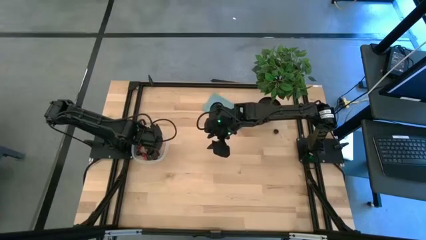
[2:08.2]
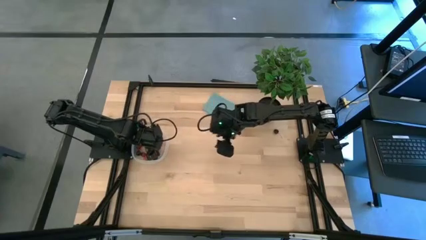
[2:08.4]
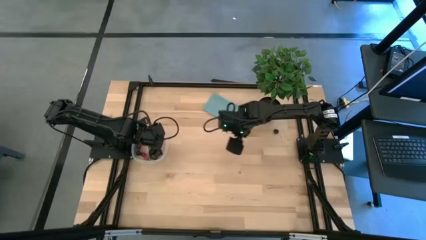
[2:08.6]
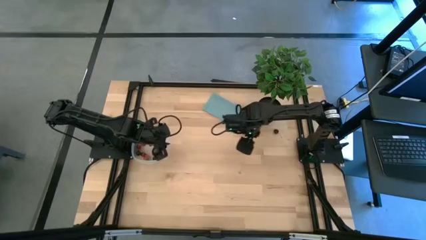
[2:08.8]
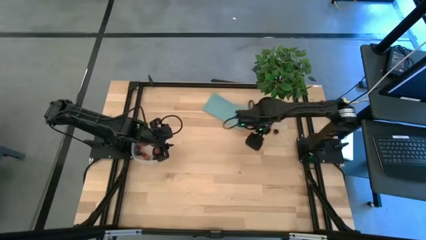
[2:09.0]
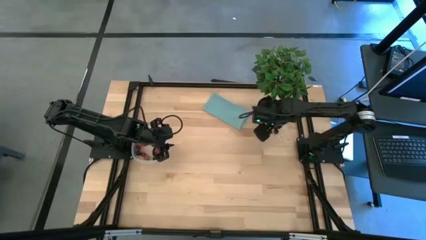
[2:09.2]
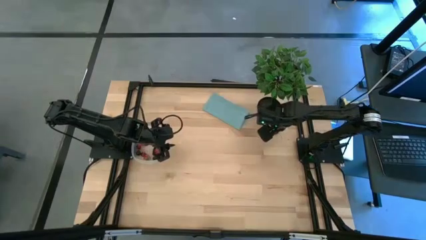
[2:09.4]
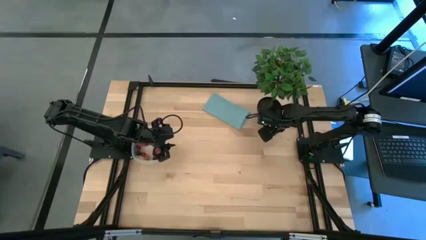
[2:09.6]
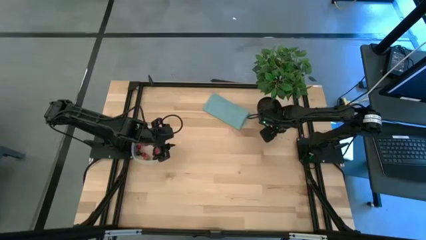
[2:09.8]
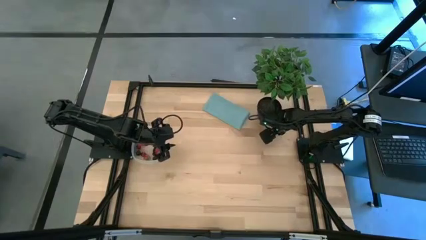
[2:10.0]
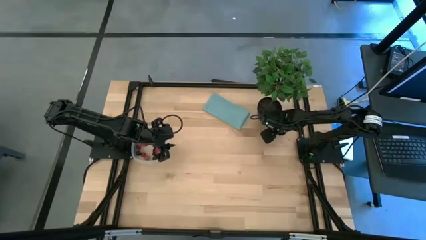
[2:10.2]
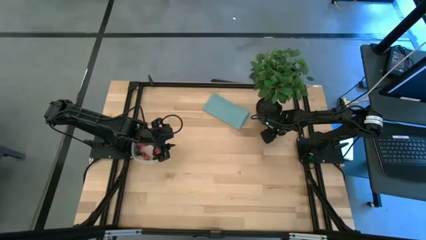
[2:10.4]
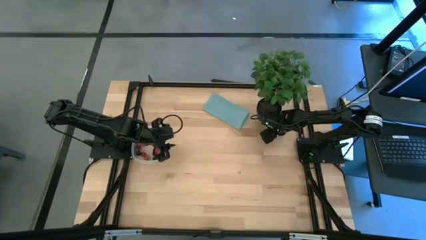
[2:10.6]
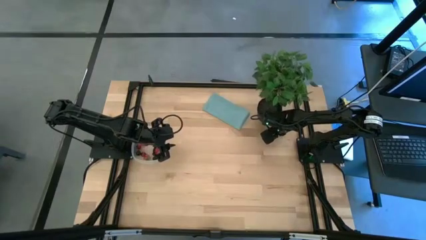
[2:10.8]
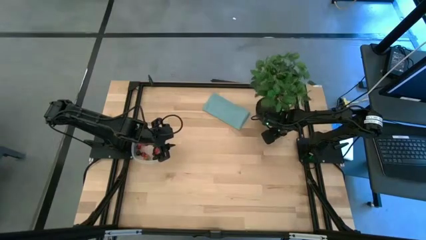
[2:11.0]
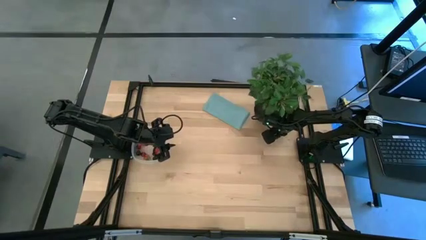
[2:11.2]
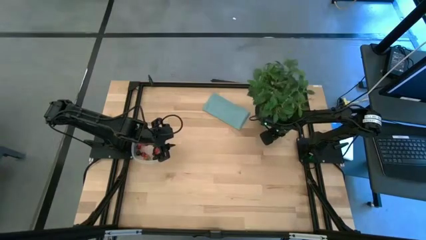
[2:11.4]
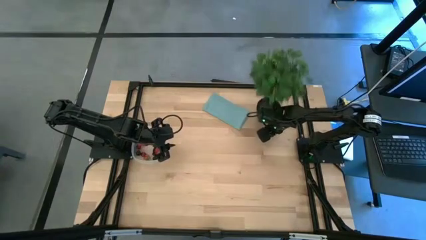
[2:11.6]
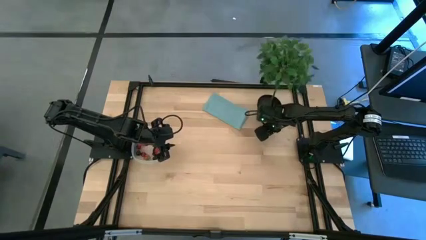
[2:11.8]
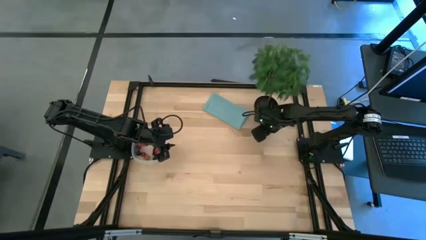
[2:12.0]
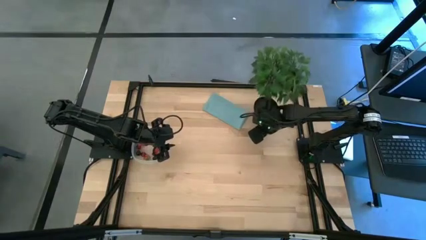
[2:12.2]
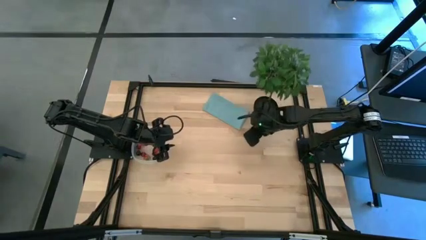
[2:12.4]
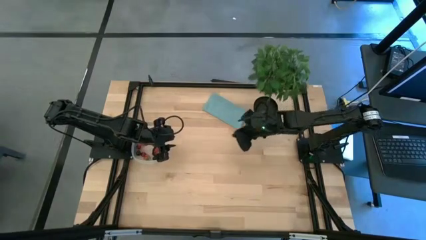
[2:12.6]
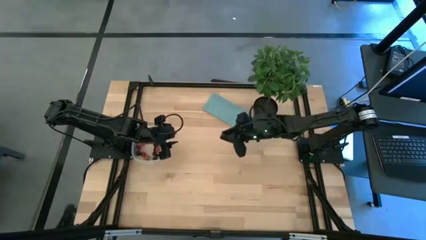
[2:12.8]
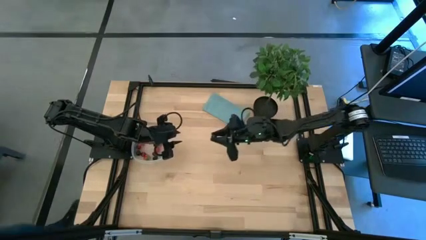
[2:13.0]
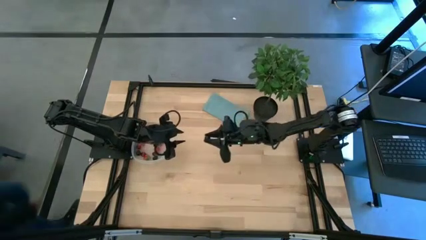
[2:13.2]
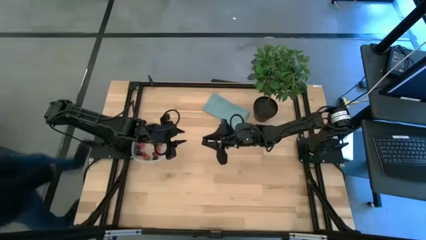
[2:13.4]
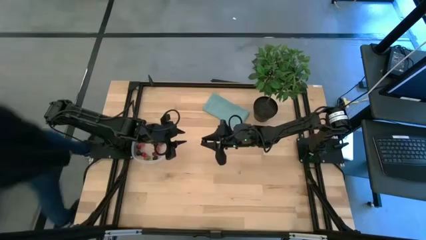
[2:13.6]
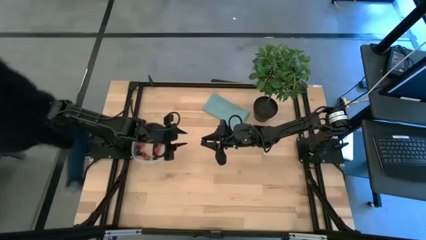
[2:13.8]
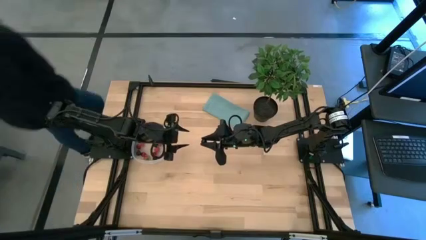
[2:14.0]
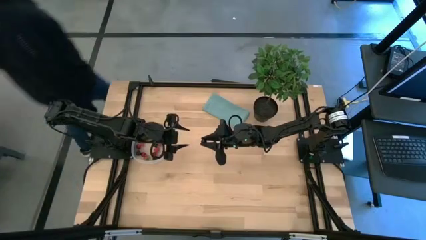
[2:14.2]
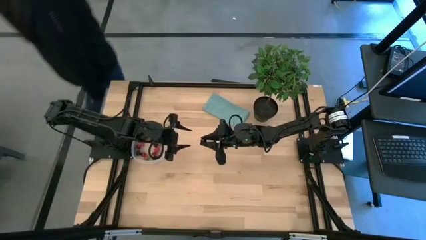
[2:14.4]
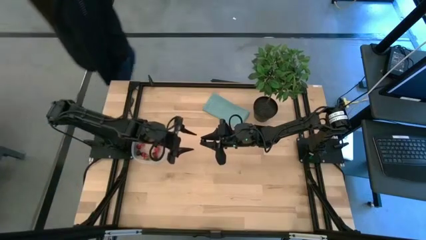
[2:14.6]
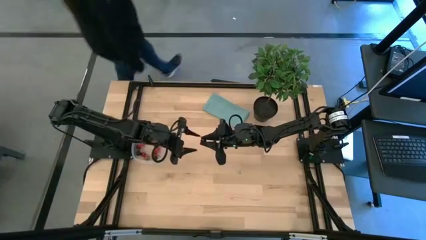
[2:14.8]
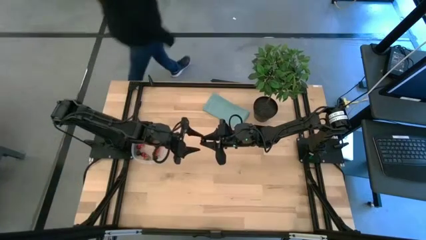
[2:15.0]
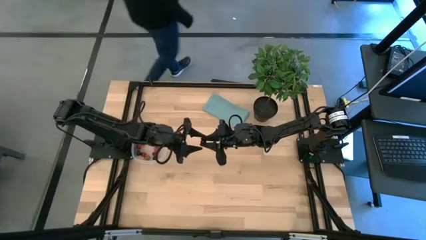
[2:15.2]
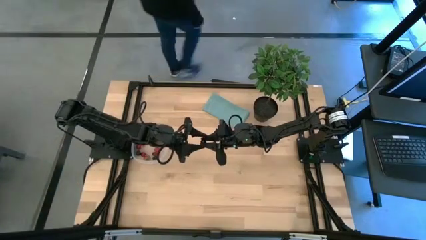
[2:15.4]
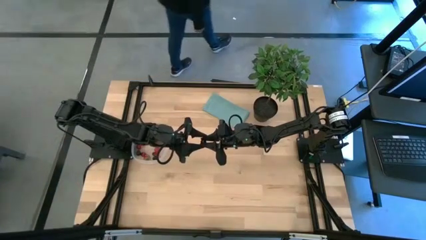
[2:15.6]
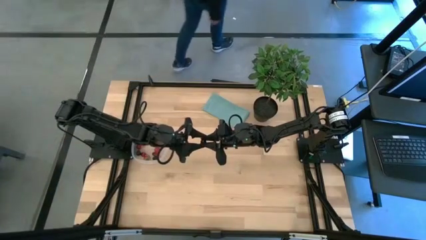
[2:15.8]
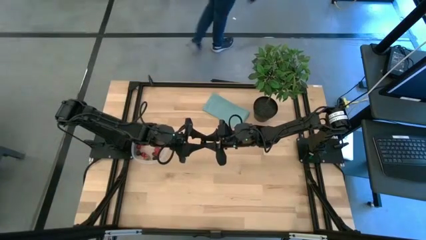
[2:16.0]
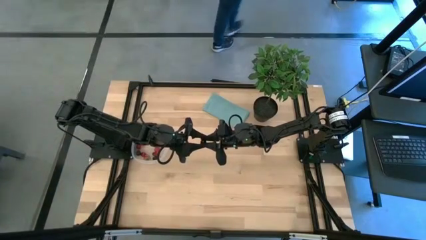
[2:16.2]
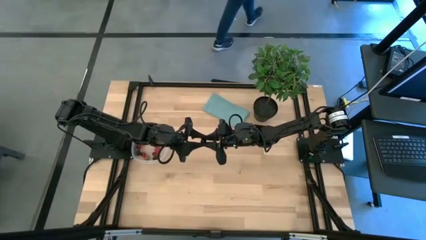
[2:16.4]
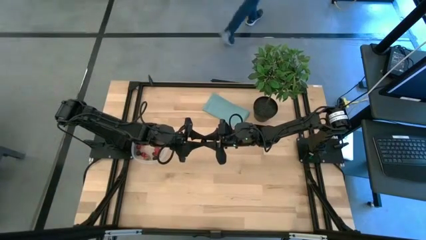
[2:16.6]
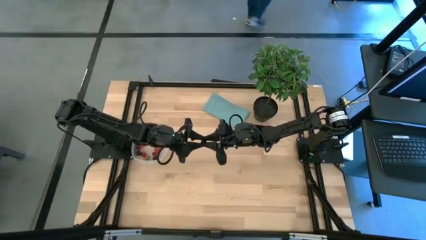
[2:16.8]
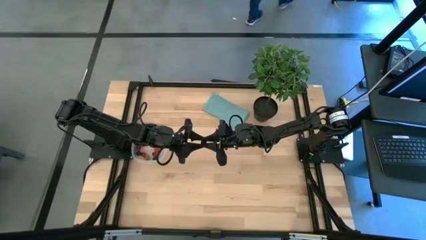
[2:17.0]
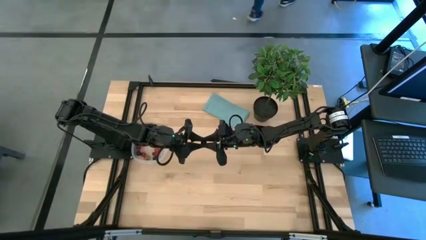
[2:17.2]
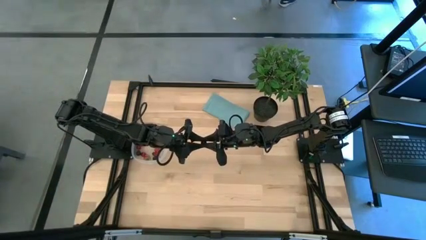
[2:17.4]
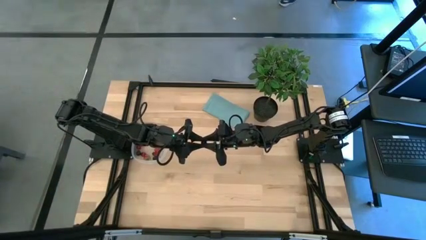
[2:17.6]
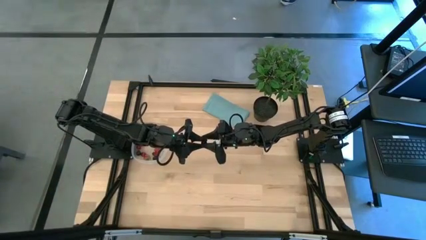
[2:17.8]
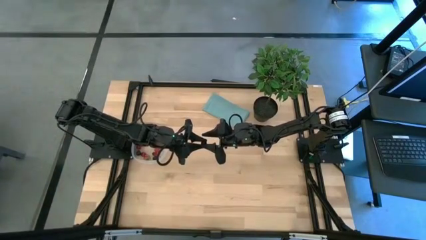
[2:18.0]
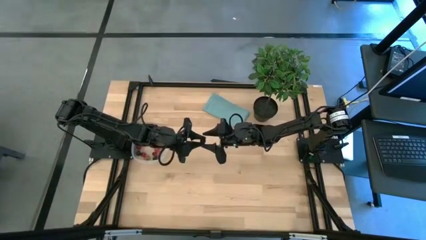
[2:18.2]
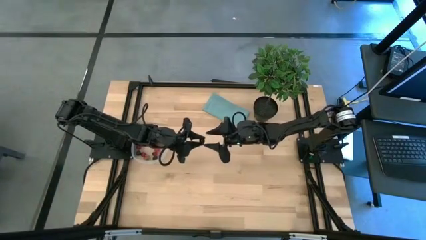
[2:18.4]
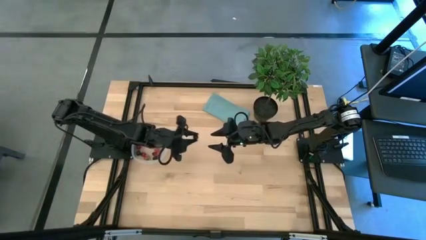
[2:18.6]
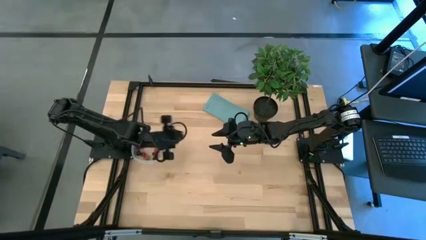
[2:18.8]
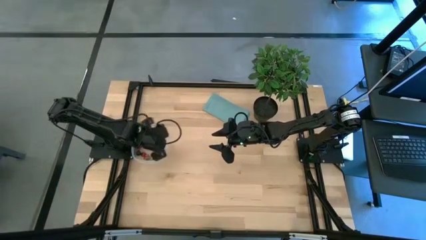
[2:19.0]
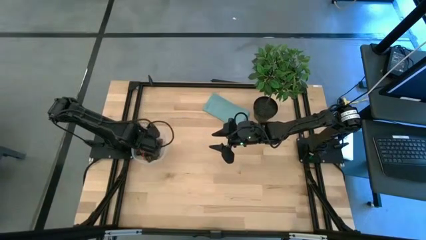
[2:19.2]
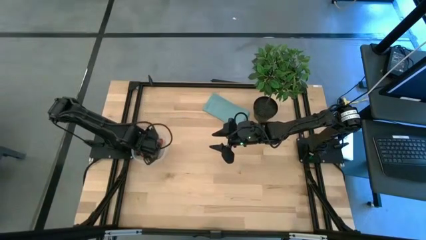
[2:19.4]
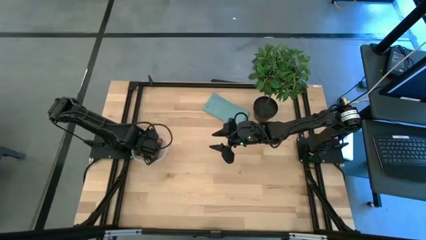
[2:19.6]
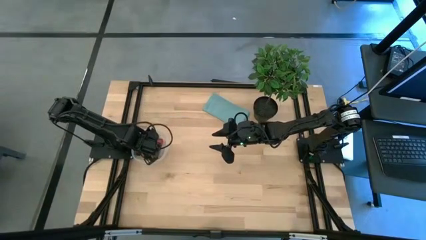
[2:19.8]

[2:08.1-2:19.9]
Task: Pick and placing Produce into tupperware
Put the black cherry into the transparent bin

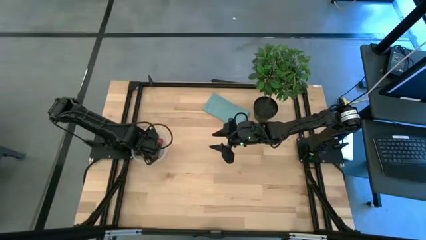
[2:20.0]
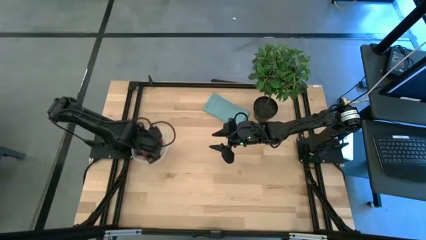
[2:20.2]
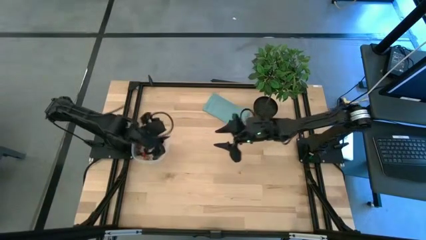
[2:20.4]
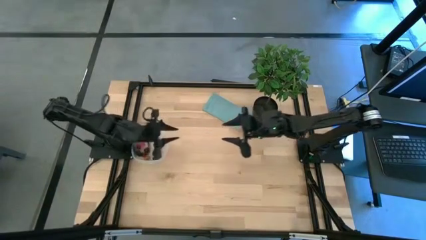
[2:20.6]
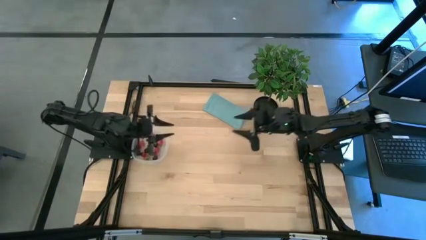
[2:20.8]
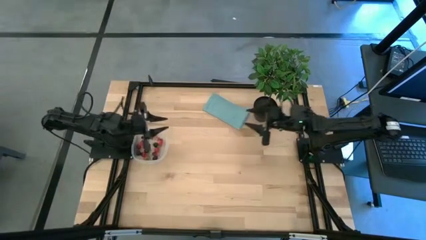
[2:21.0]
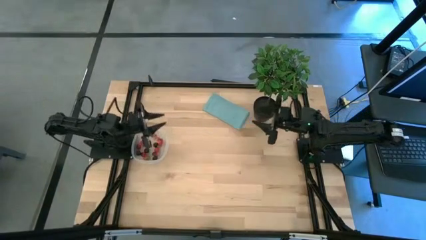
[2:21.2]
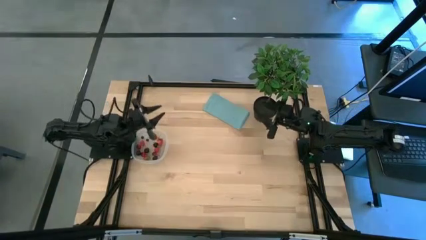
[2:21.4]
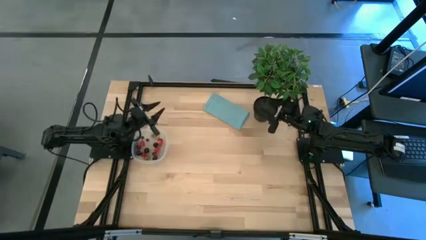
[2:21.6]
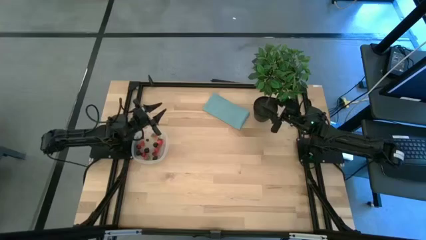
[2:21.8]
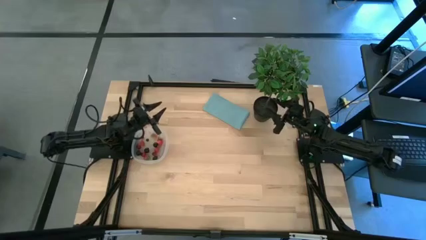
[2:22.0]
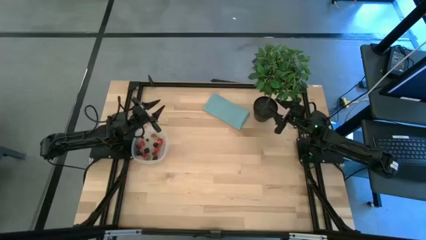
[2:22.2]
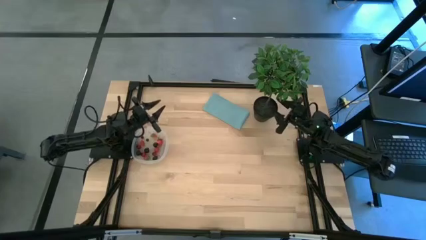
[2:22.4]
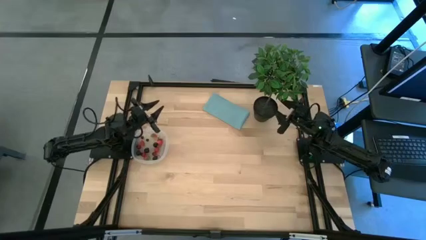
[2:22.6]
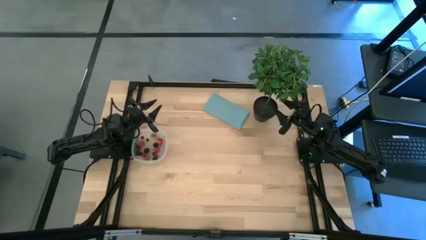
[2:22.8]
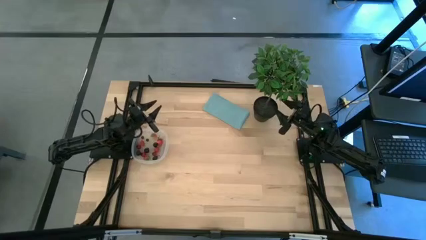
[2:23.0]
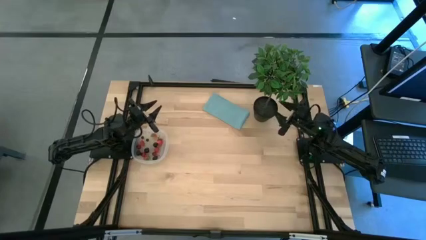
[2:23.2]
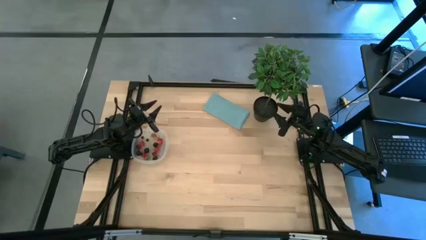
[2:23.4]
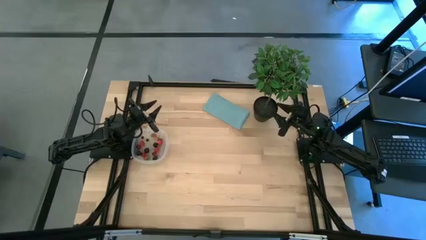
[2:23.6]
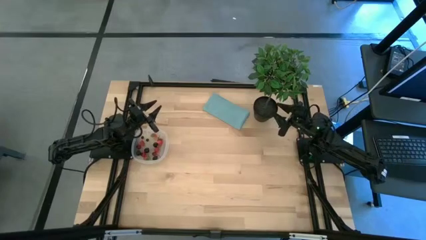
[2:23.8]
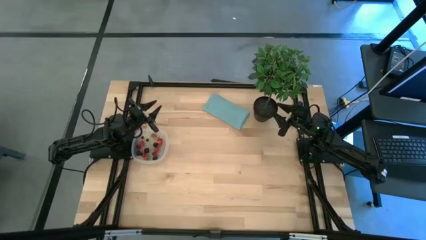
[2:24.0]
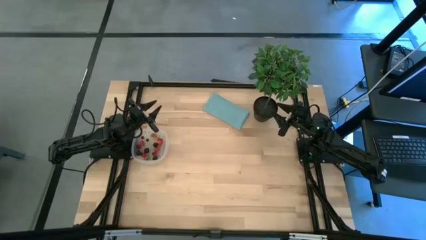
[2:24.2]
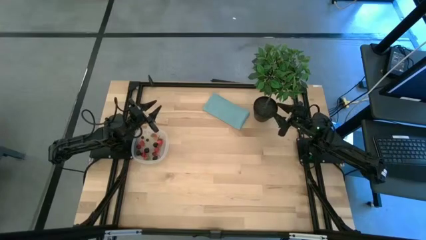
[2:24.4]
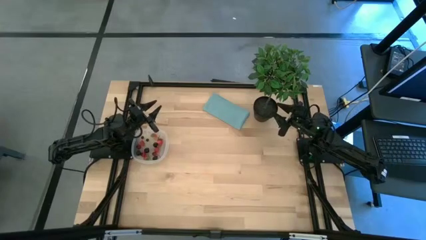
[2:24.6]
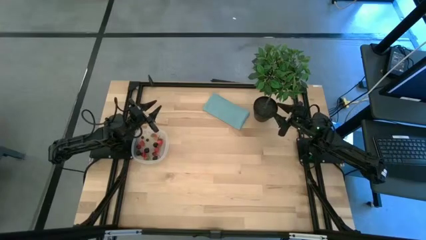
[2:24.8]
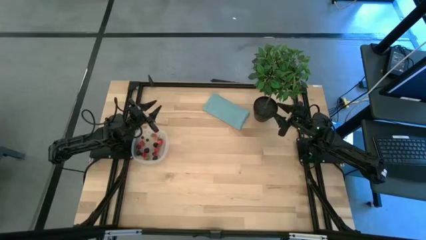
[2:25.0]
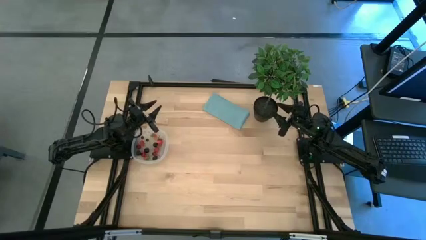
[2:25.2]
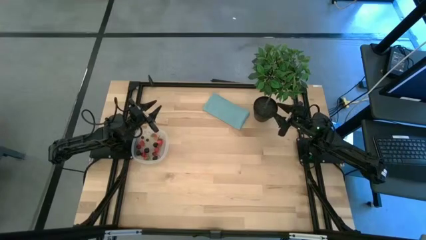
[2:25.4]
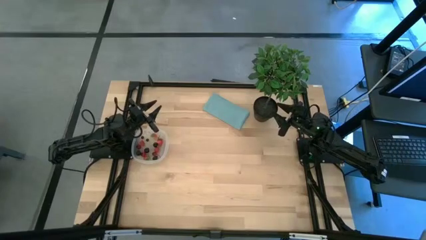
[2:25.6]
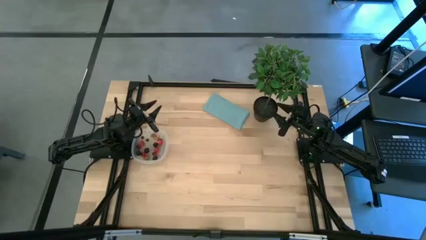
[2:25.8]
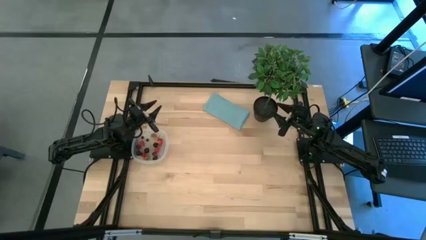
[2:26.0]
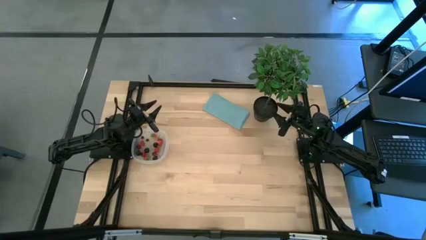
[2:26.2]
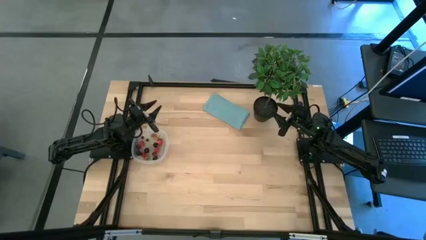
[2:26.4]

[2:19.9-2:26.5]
Return to Home Position
